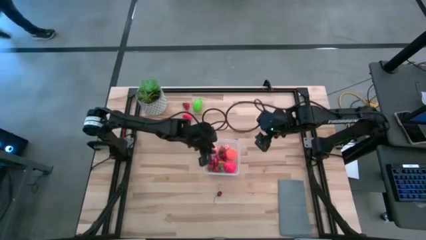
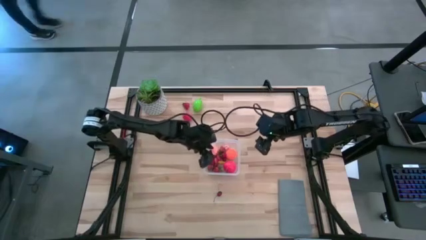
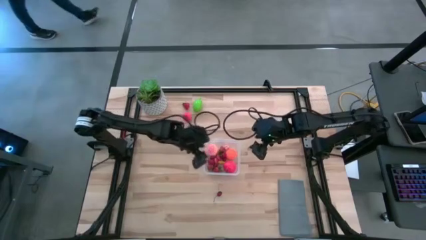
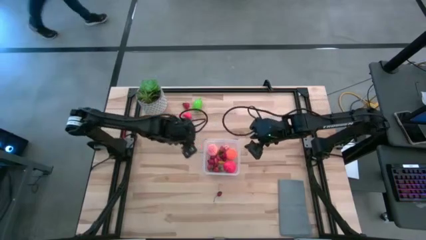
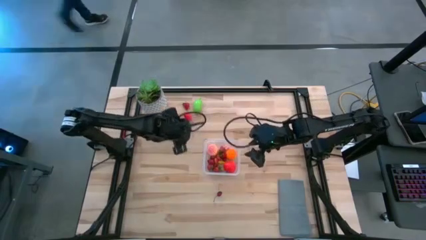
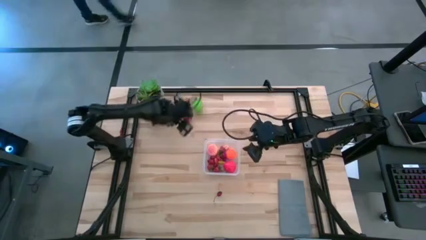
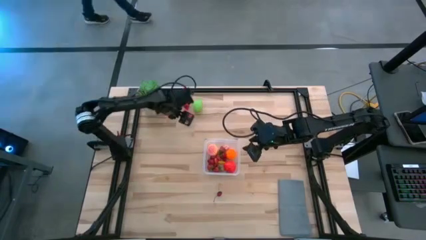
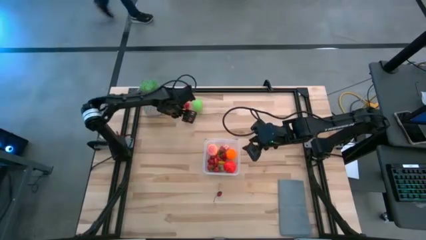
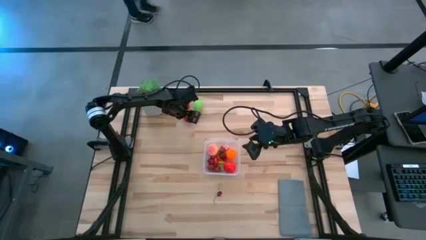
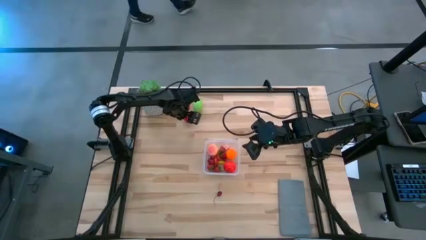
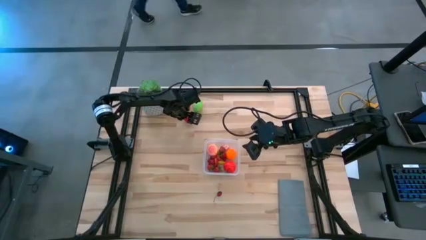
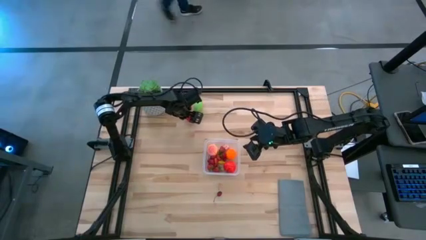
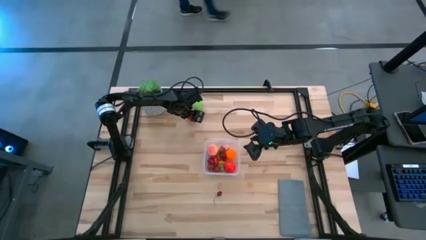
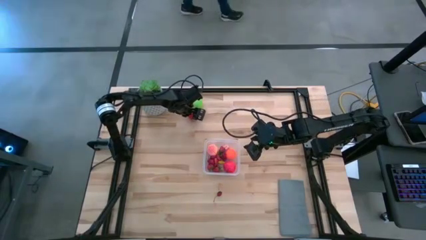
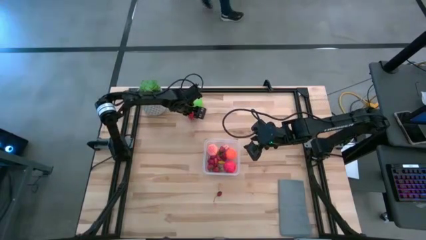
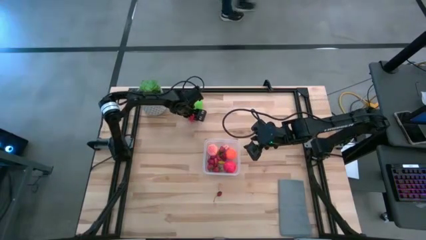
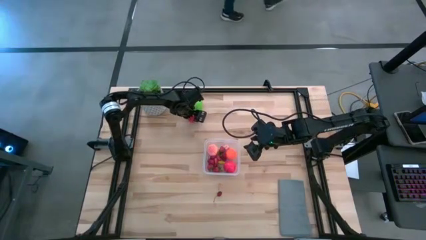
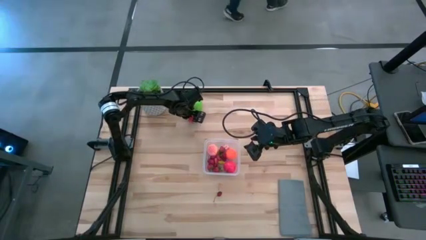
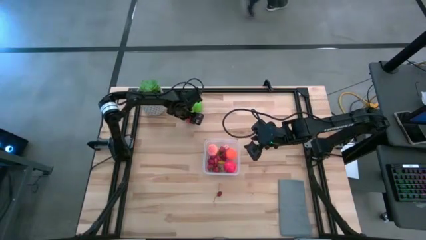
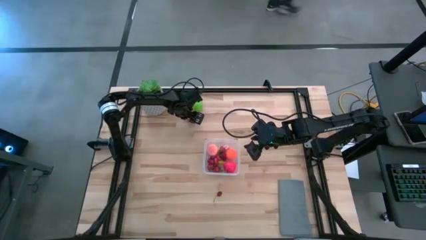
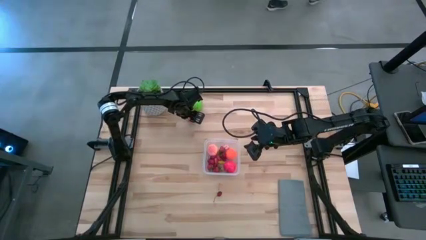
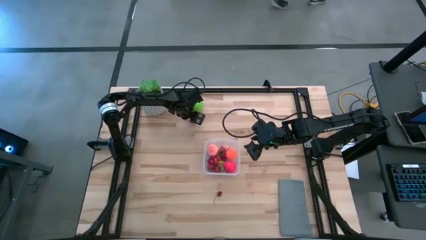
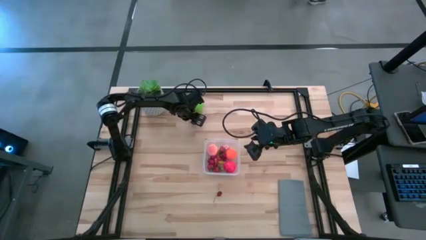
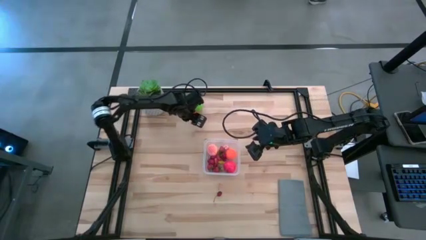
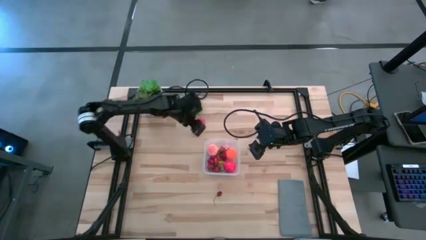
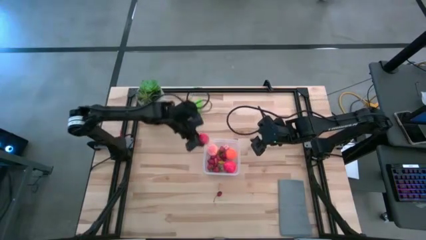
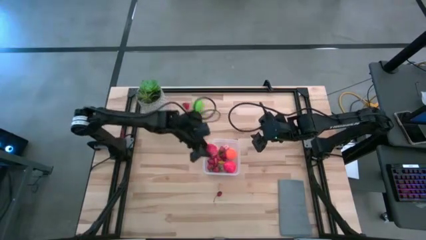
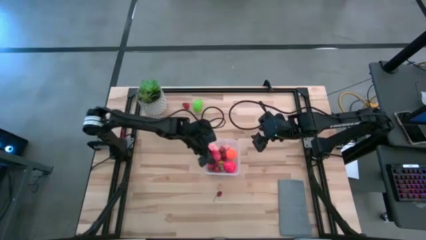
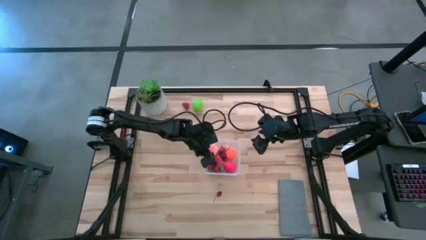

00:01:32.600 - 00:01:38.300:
Task: Pick and placing Produce into tupperware
Put the red strawberry into the transparent container

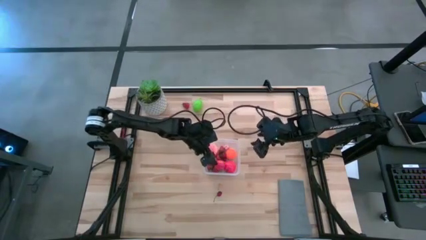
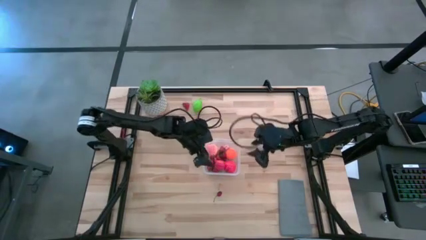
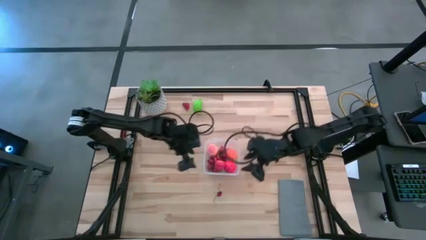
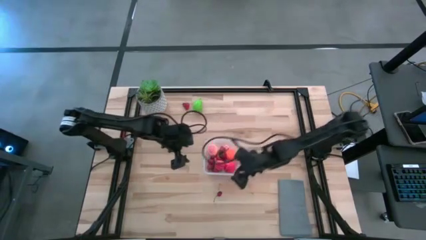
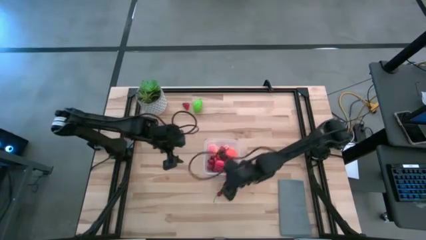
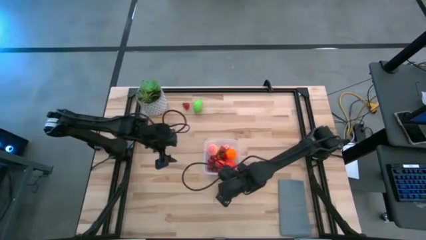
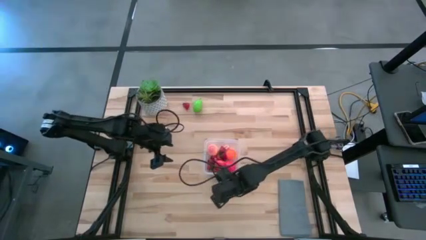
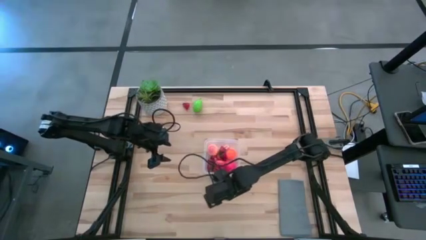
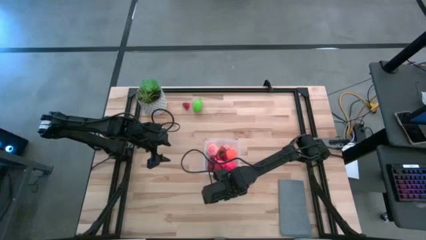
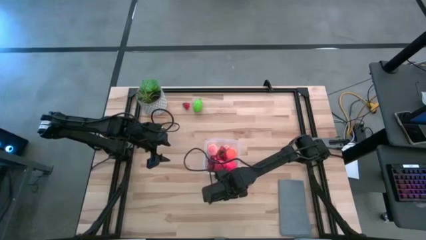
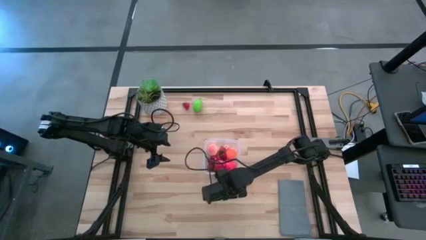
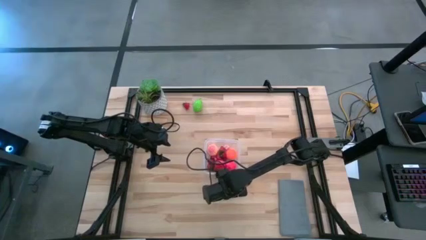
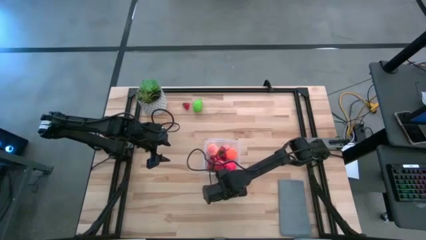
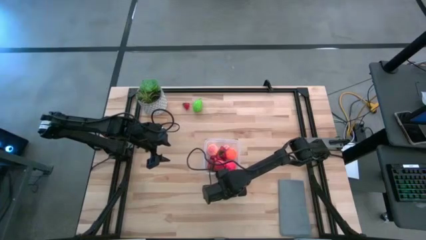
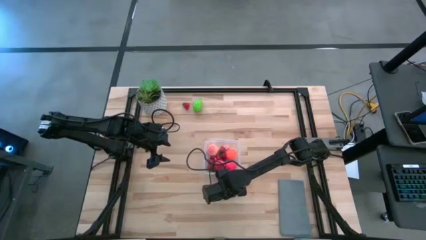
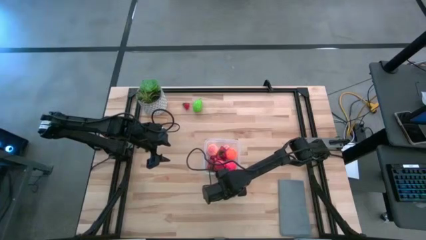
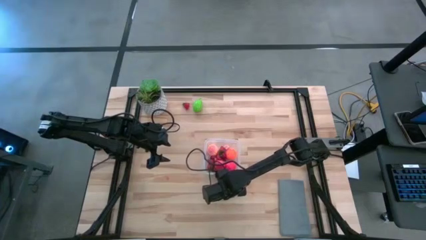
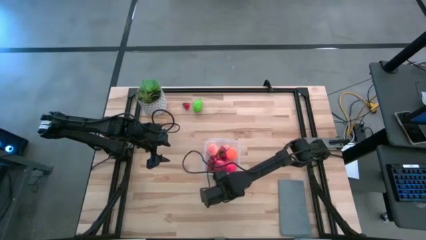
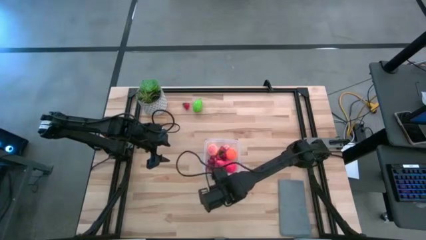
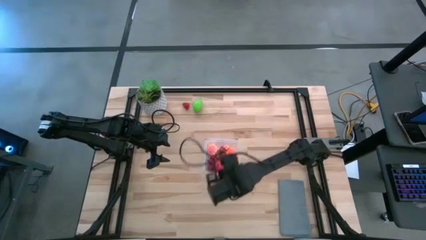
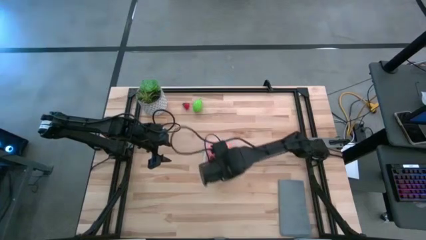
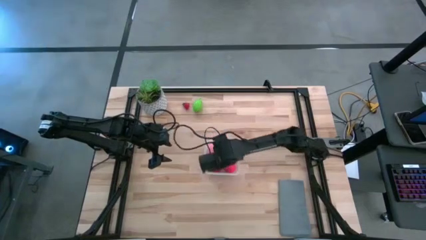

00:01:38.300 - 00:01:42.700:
Put the red cherry into the transparent container

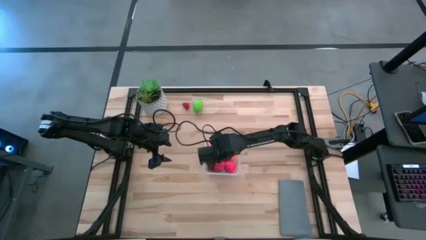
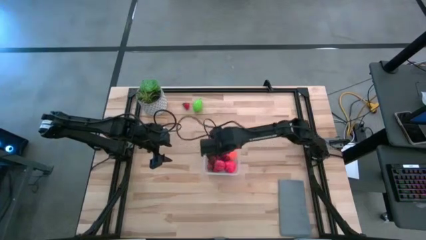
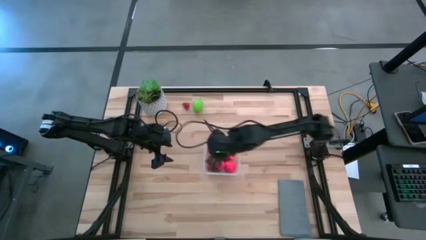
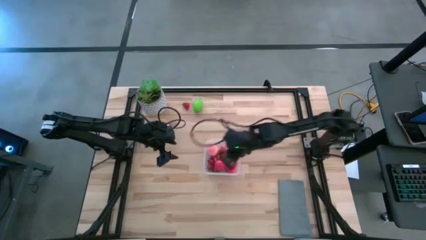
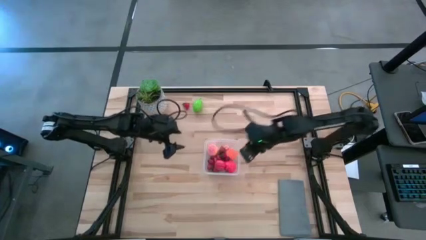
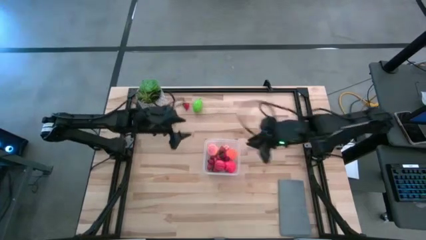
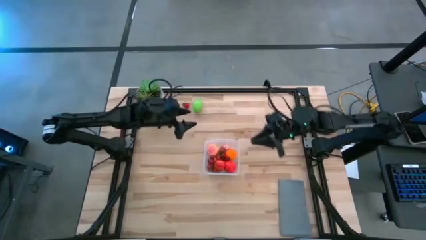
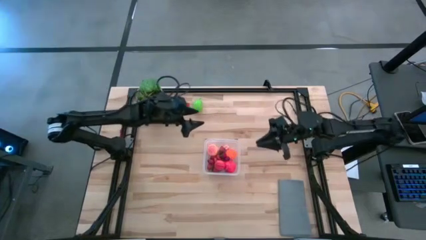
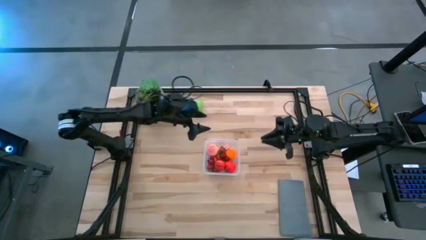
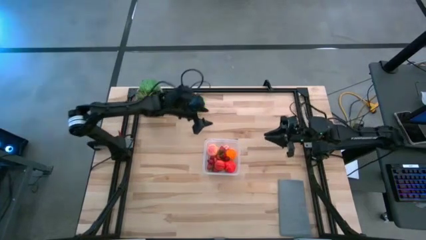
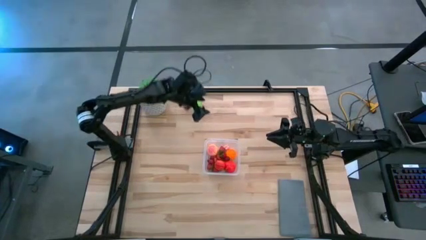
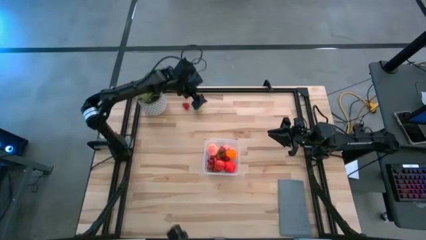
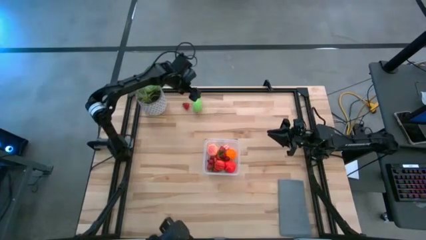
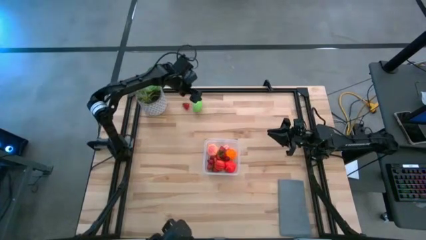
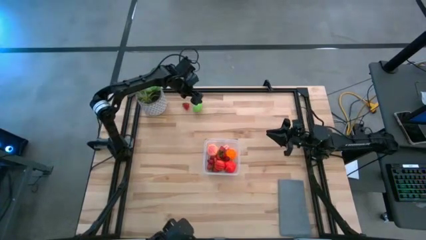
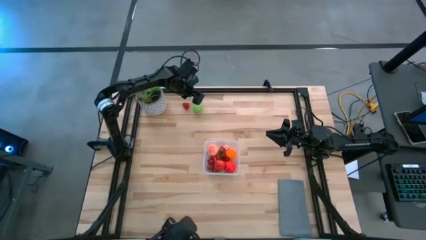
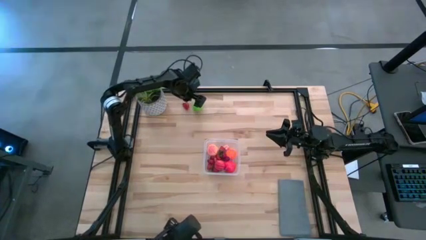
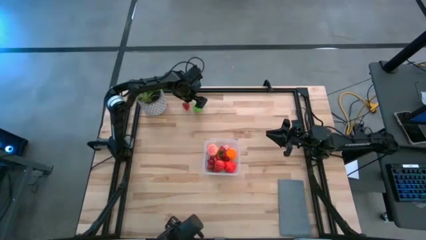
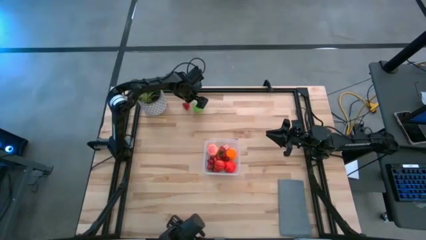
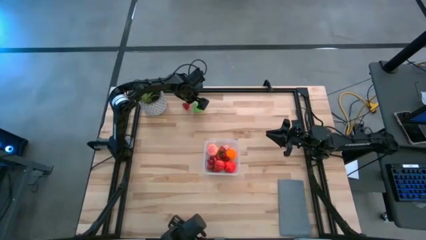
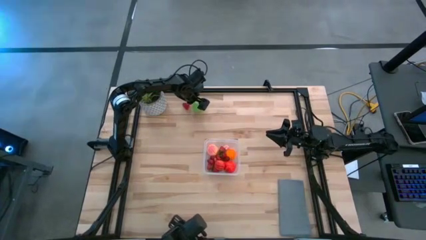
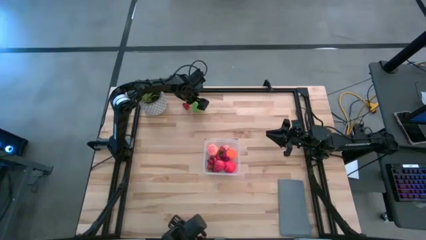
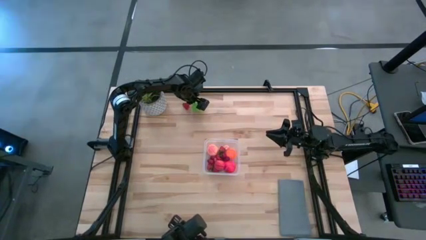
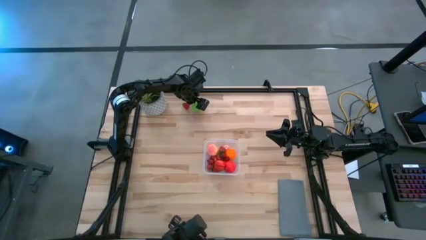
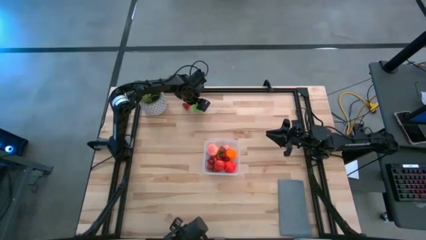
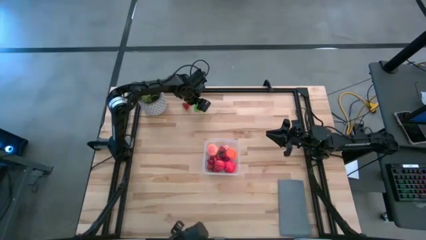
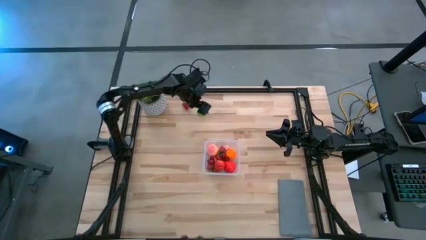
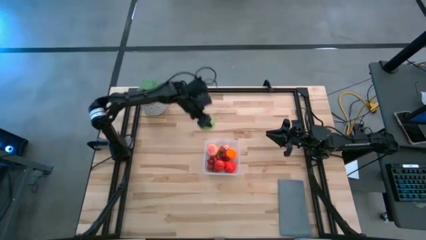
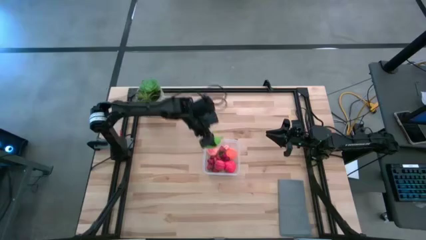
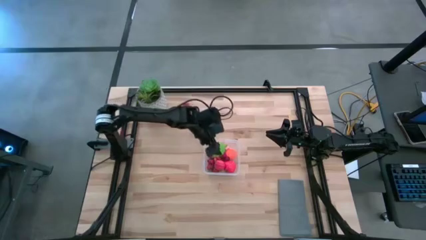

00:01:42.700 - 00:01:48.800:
Put the green melon into the transparent container
